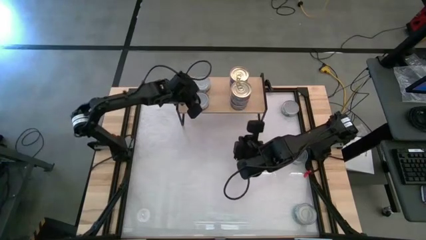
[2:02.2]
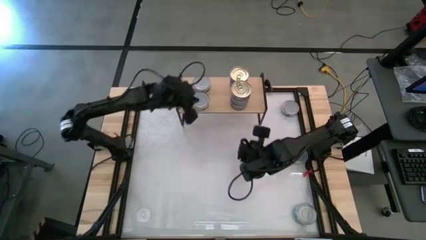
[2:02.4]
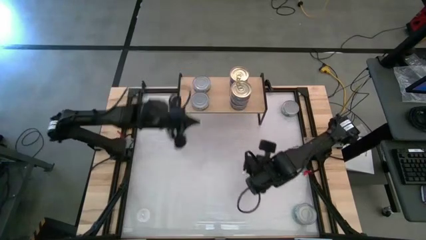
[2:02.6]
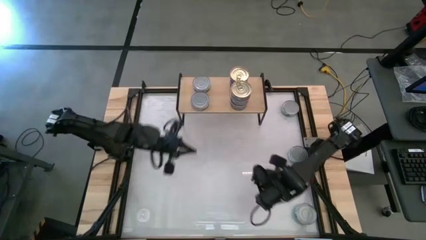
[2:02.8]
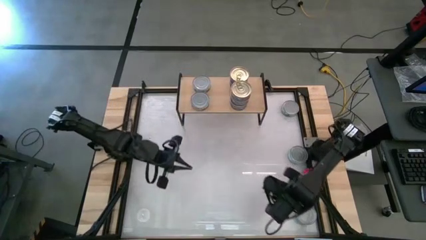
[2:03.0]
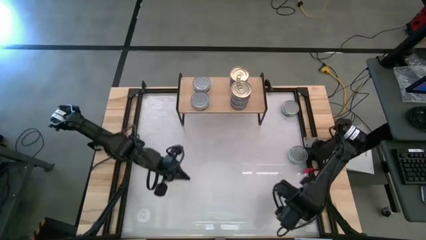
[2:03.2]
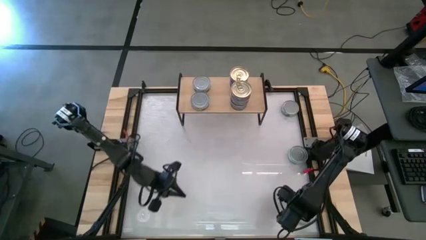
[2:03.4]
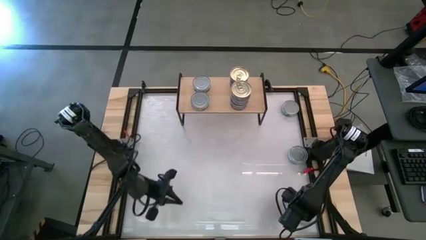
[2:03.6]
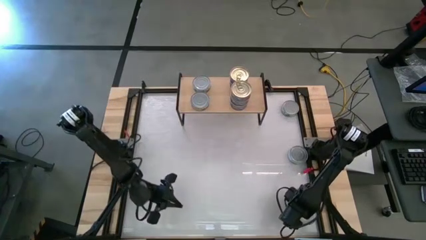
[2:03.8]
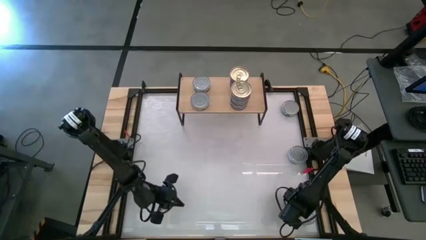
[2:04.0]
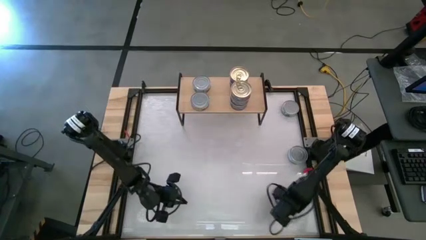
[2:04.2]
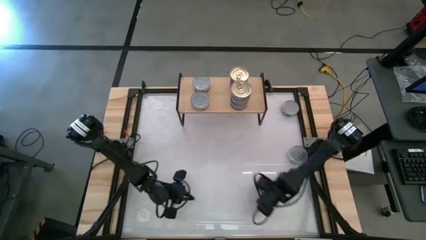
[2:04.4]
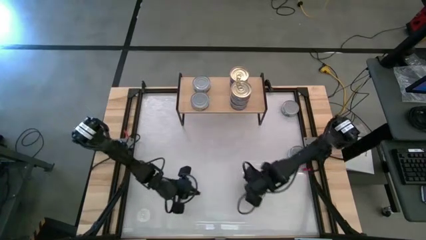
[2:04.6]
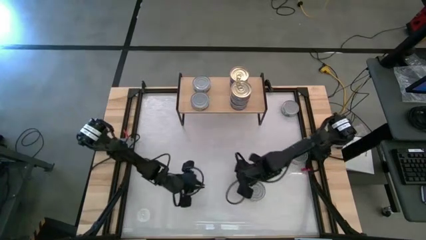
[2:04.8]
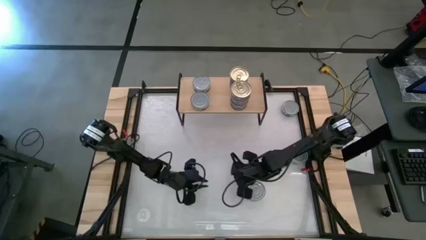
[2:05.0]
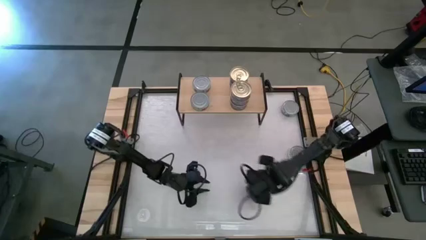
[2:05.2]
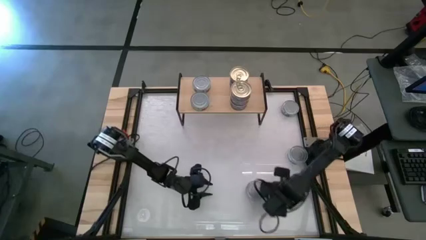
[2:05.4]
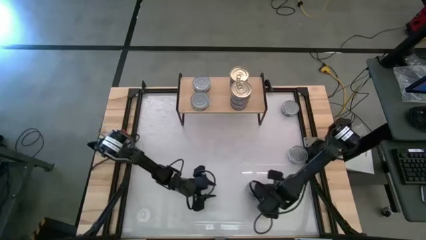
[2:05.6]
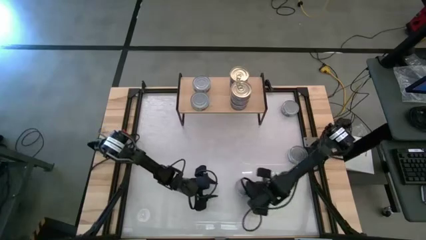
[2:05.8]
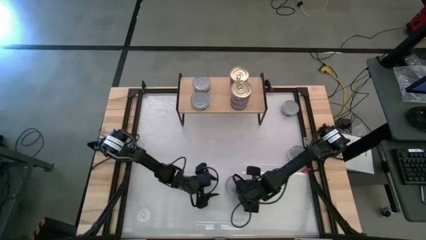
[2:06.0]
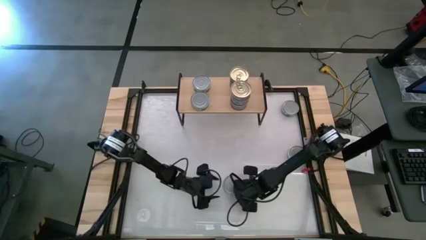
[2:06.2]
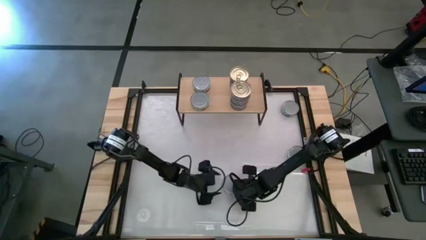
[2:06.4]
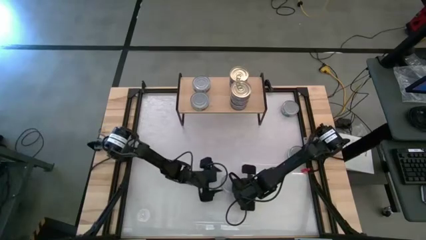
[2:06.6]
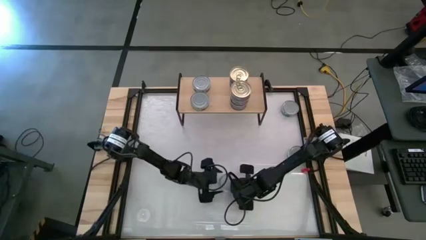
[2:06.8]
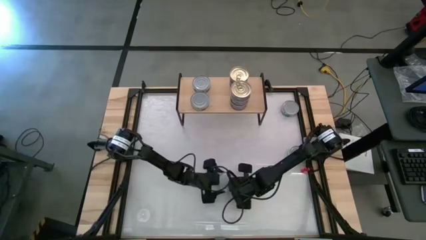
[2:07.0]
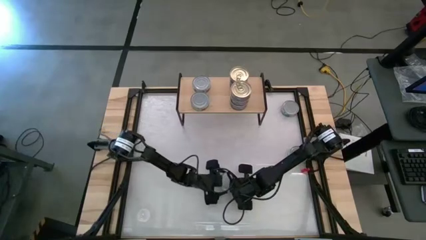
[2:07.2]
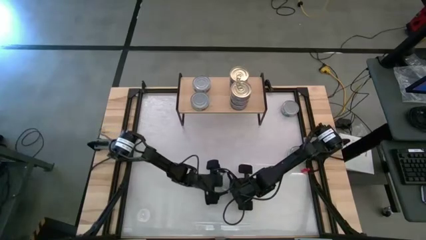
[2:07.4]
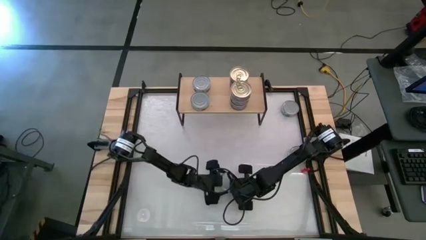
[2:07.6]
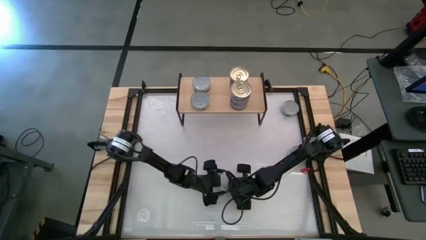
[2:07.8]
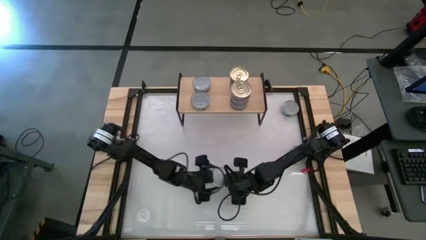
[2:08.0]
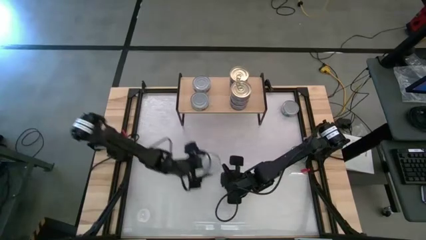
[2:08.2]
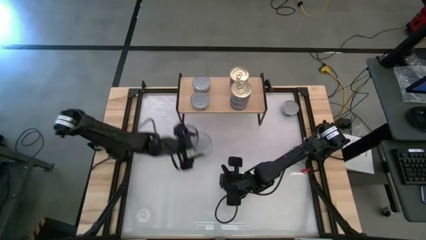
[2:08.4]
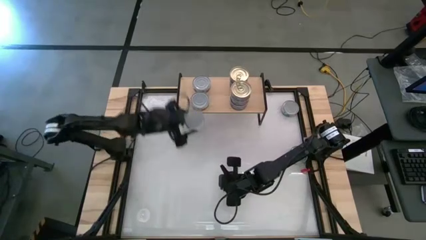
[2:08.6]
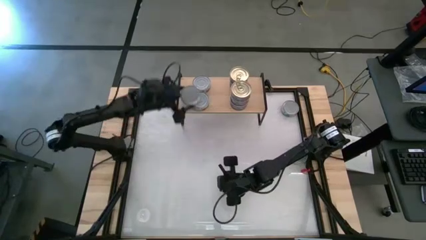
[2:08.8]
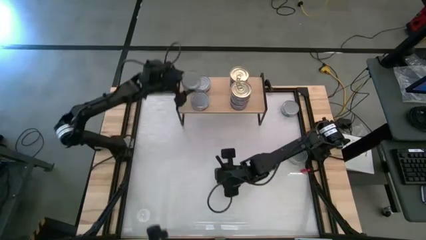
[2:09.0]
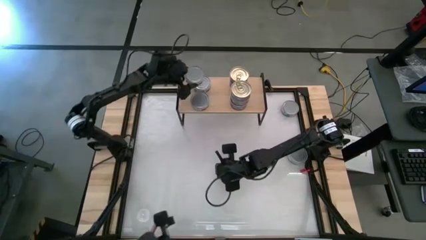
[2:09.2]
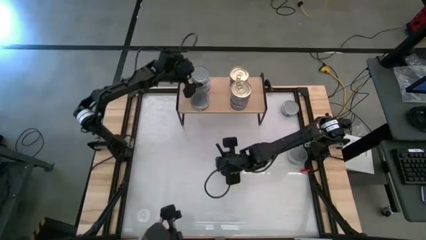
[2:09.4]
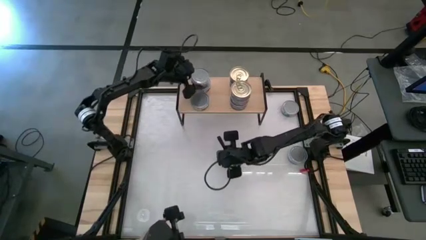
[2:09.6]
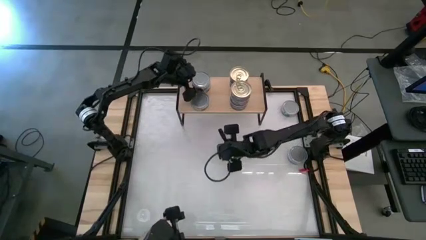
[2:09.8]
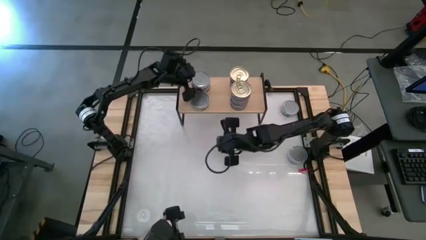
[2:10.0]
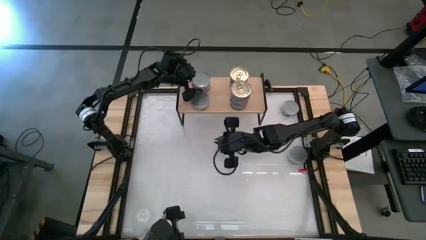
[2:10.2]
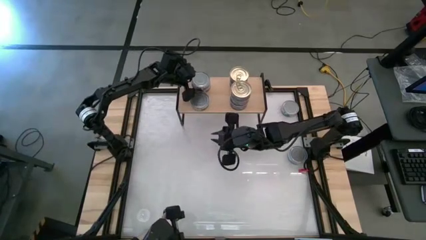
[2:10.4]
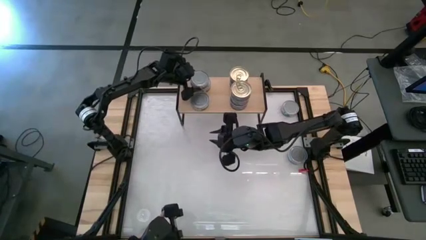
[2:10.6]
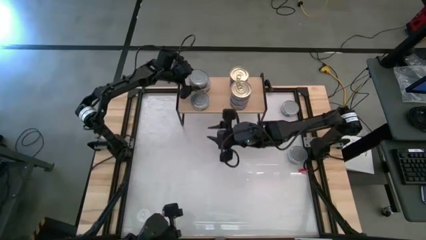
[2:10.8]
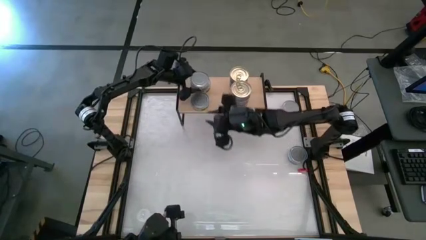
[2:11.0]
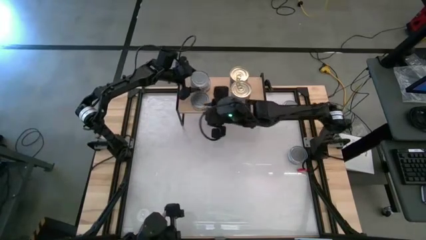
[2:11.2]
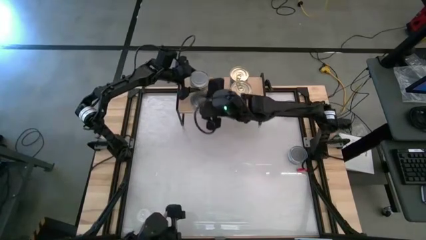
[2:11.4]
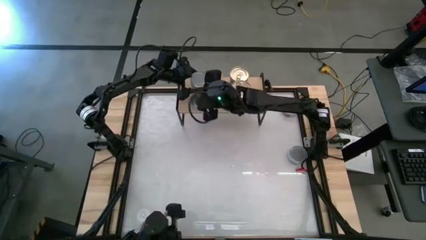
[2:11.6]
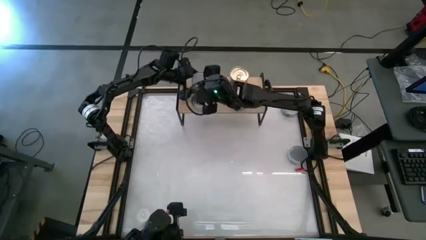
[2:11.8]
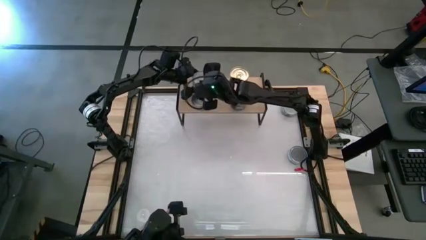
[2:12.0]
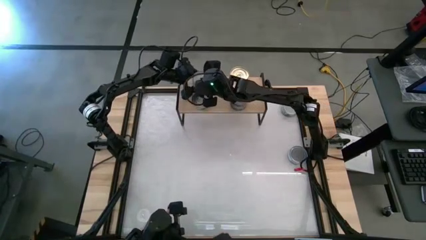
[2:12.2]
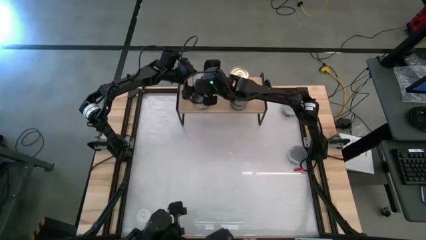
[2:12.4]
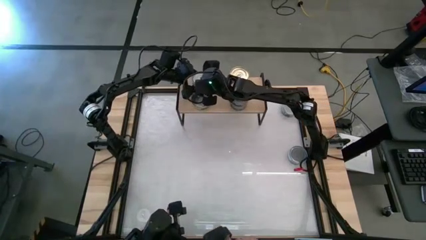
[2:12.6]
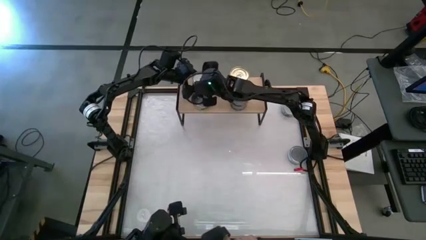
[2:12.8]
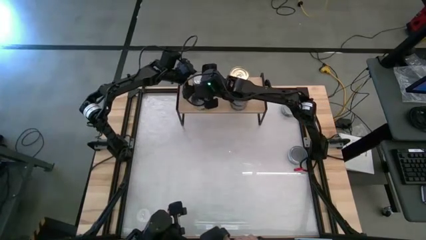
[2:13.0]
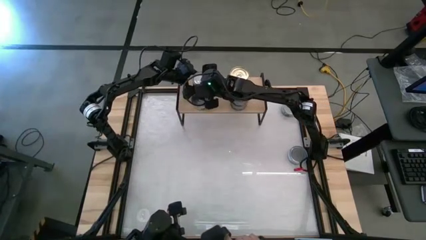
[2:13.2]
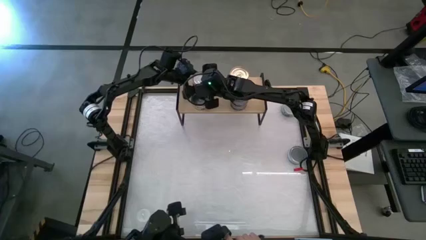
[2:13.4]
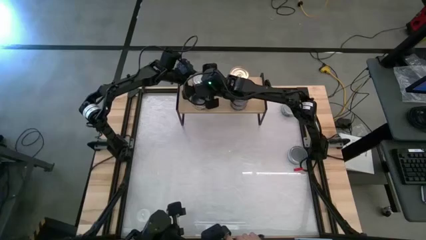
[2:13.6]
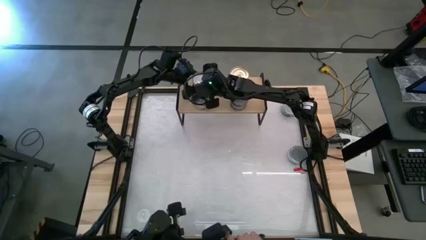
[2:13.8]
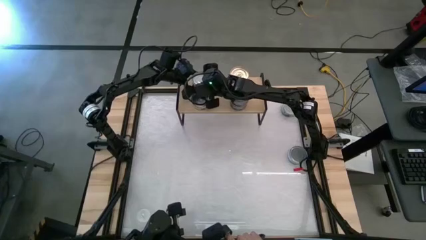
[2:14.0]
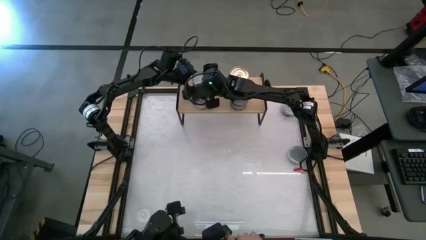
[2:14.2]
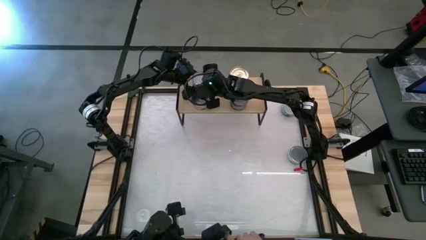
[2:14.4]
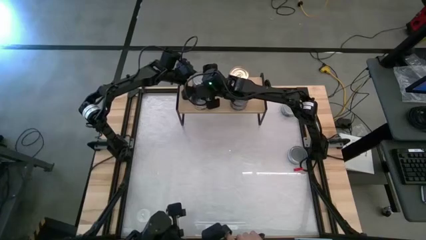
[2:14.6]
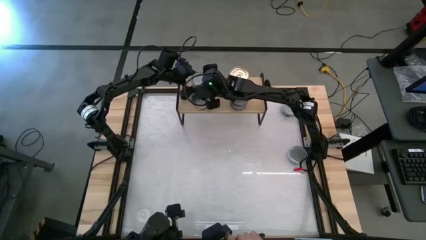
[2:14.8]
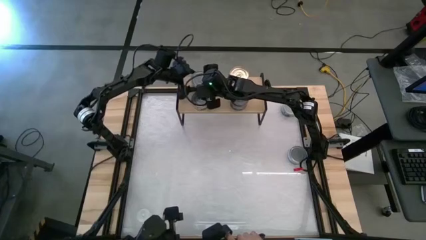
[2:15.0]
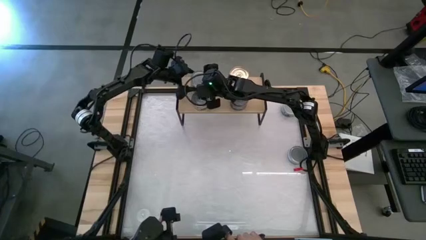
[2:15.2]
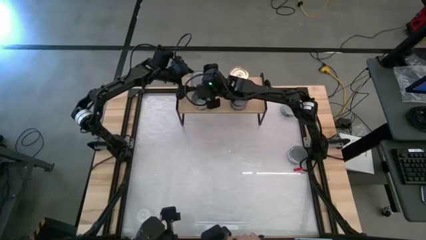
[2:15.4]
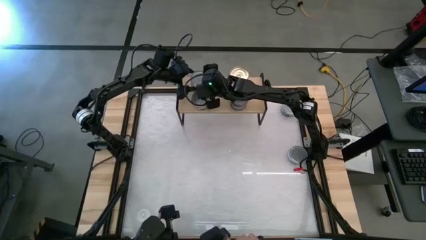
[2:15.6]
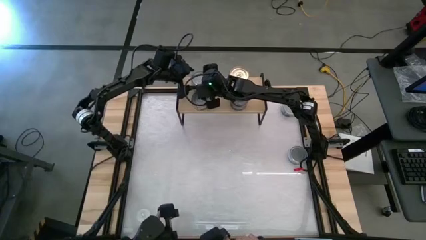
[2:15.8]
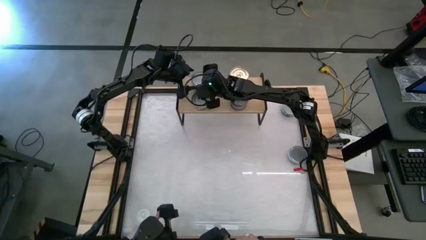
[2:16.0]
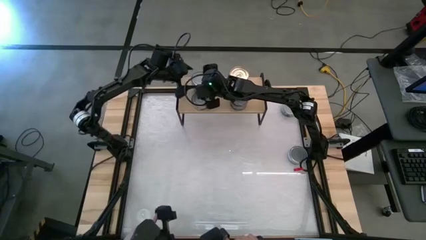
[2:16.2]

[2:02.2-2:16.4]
Task: Stack canned seafood by type on shelf
Stack the green tuna can on top of the other green tuna can on the shelf

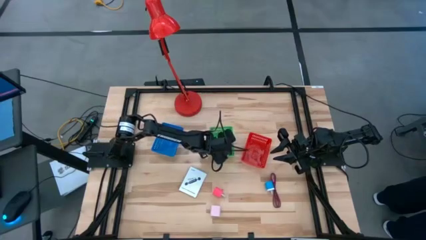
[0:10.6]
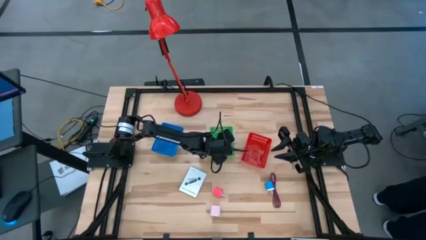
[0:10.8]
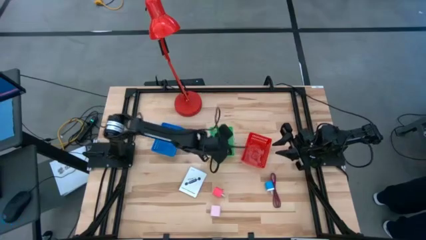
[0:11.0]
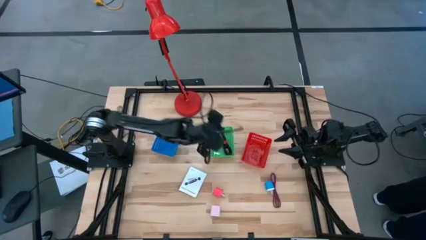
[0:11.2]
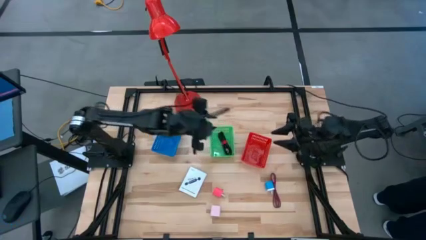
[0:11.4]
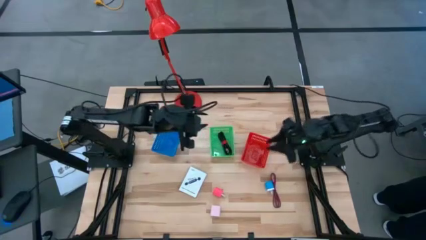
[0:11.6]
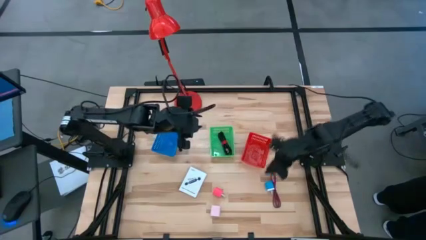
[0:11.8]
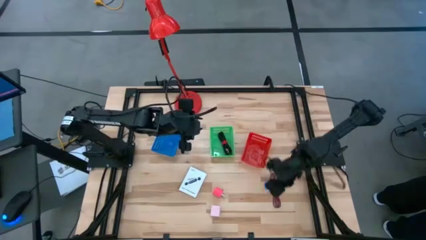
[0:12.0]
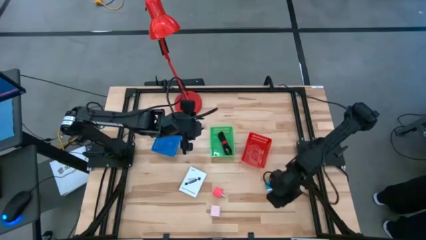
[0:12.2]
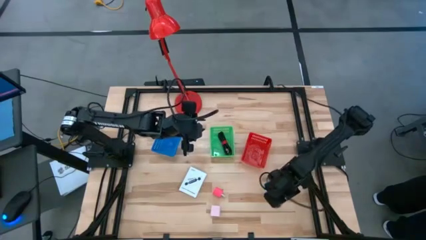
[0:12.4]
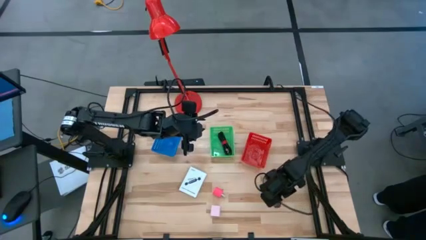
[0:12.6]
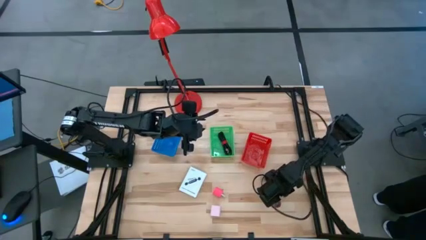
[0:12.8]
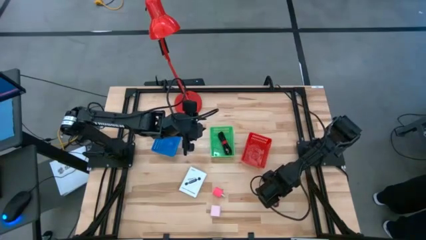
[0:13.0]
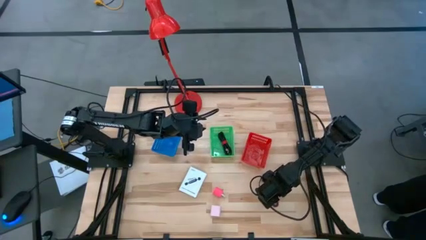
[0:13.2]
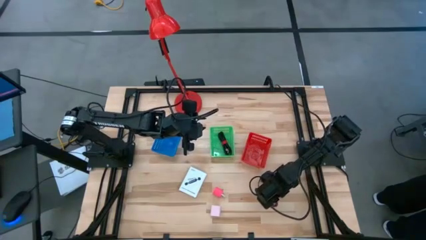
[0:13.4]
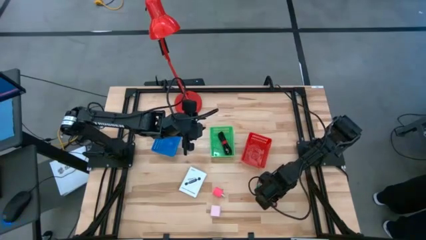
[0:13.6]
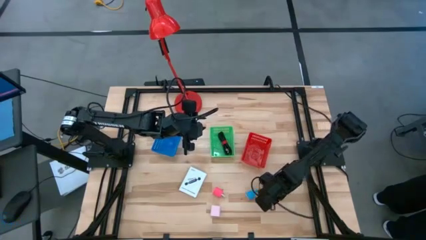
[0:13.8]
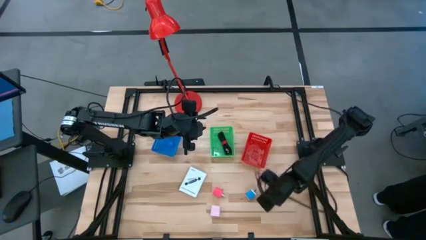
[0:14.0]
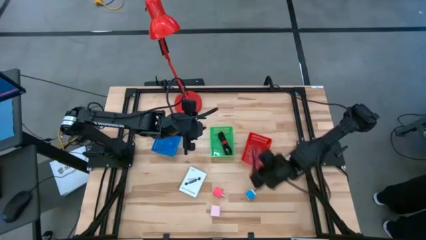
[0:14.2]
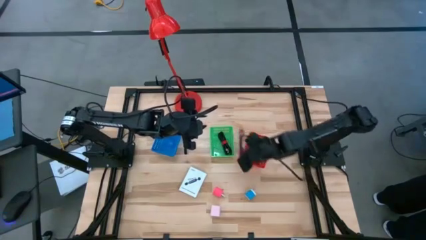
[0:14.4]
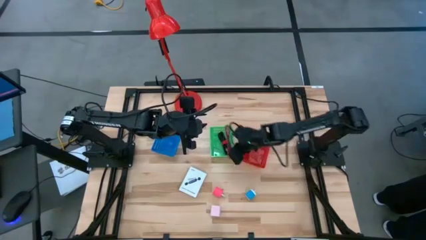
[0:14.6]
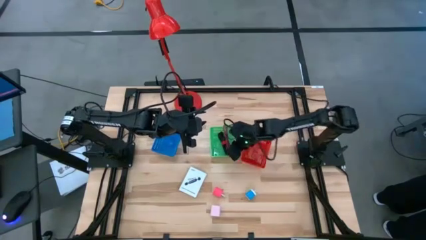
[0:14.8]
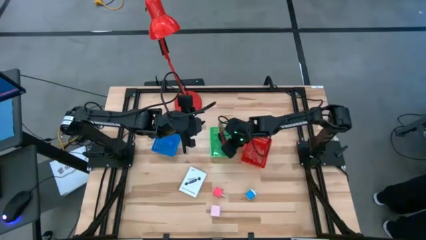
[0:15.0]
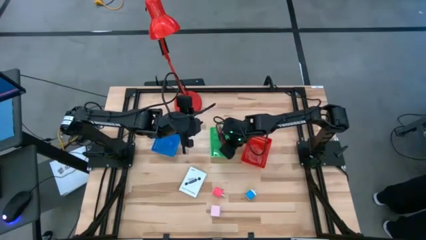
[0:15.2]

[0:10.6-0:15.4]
Task: Pick and place items into bin
Put the pink charger cable into the green bin
